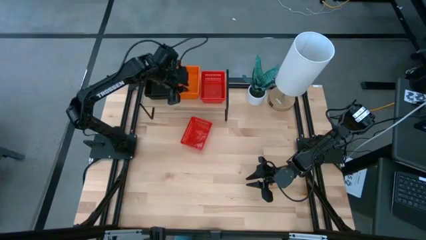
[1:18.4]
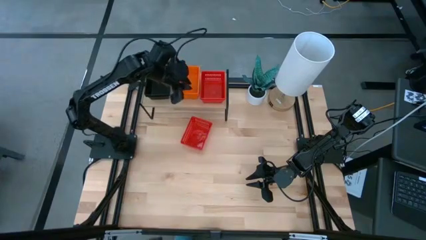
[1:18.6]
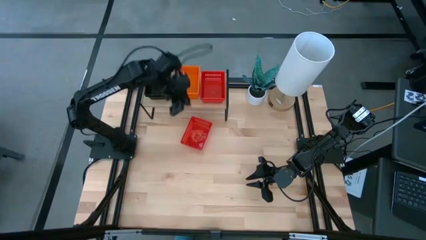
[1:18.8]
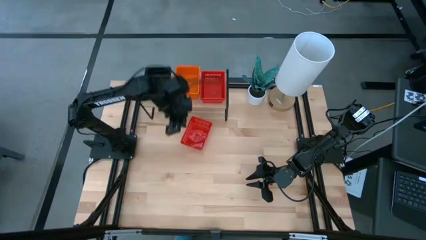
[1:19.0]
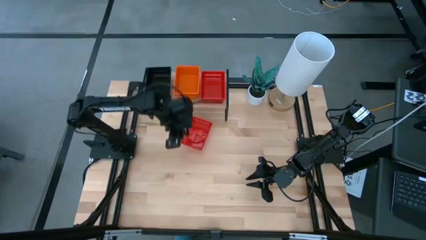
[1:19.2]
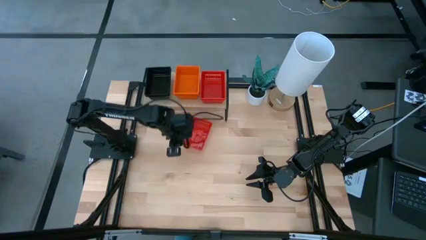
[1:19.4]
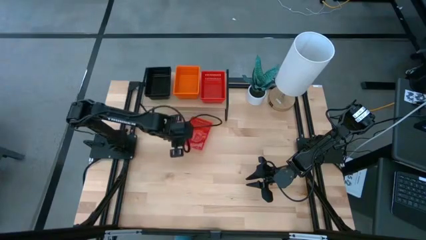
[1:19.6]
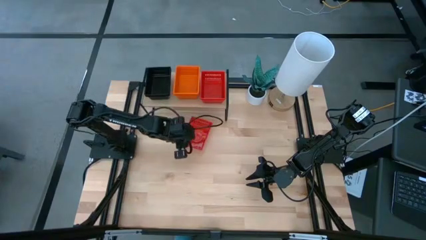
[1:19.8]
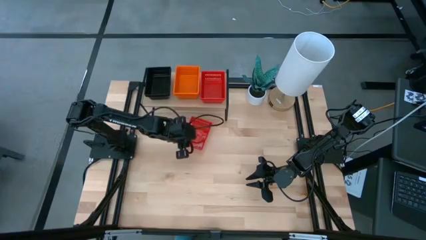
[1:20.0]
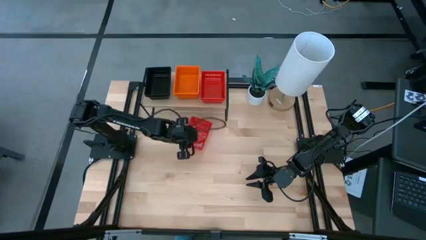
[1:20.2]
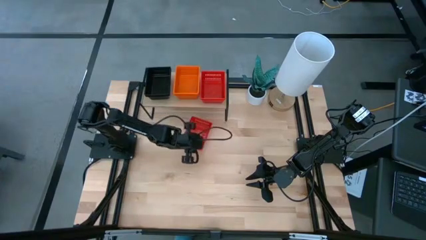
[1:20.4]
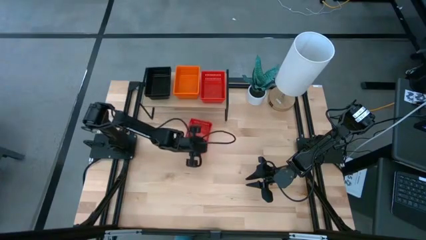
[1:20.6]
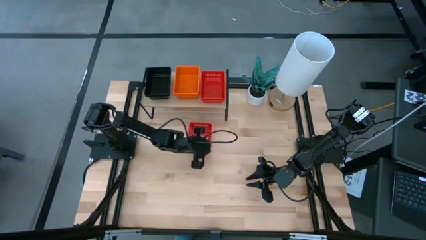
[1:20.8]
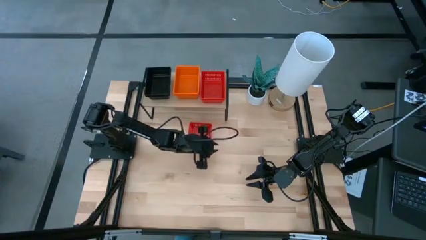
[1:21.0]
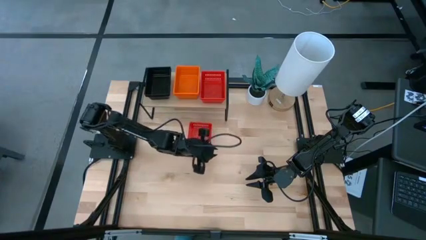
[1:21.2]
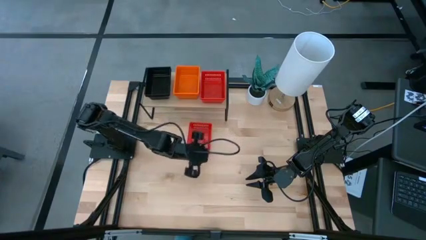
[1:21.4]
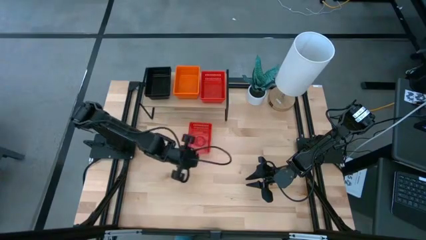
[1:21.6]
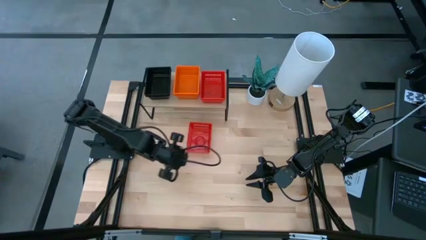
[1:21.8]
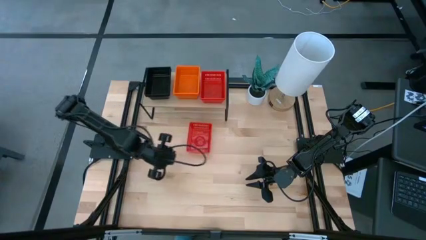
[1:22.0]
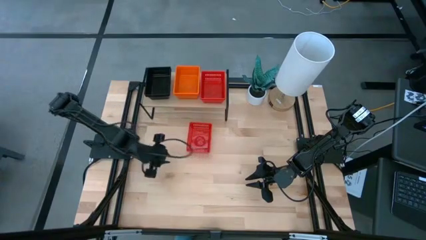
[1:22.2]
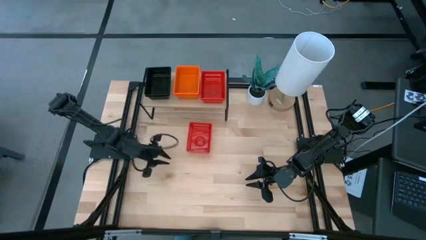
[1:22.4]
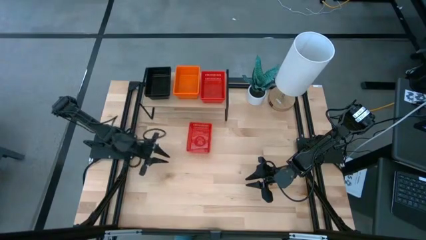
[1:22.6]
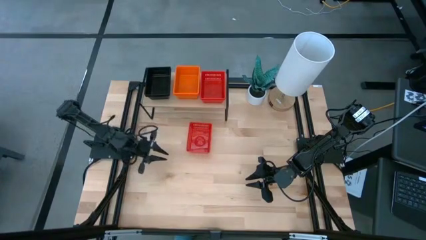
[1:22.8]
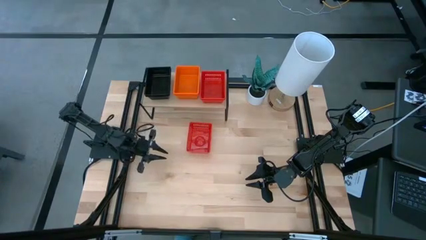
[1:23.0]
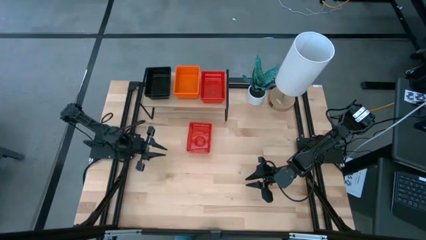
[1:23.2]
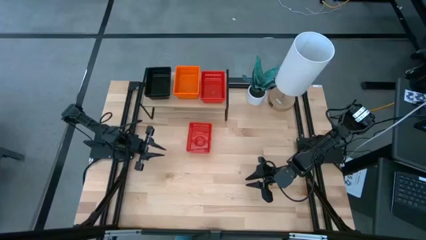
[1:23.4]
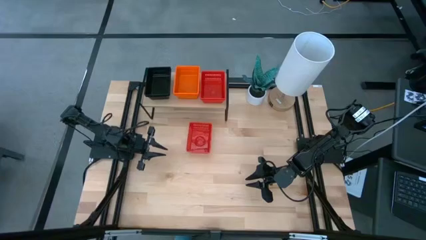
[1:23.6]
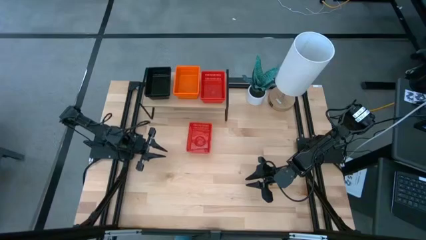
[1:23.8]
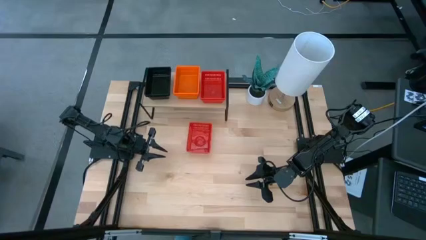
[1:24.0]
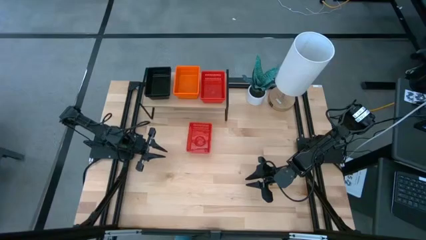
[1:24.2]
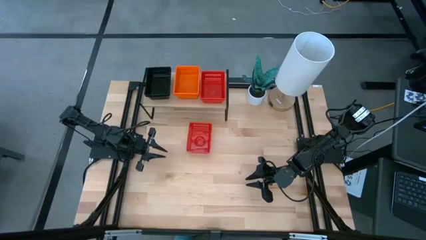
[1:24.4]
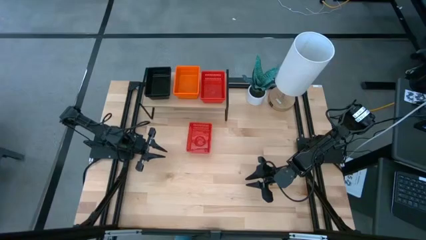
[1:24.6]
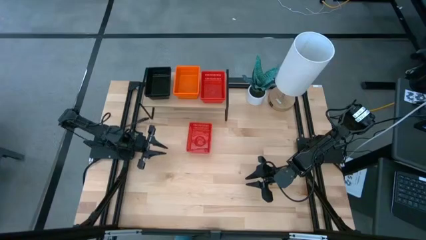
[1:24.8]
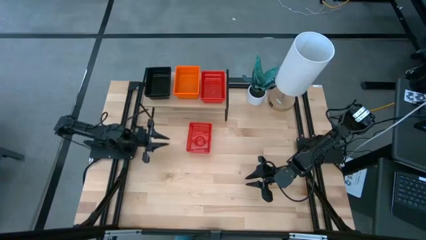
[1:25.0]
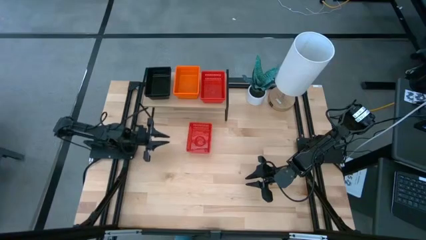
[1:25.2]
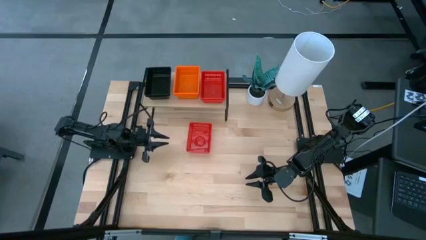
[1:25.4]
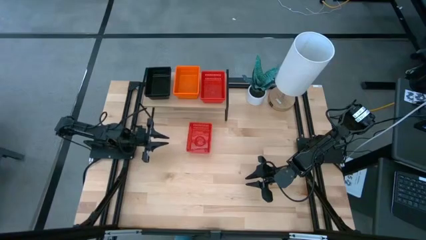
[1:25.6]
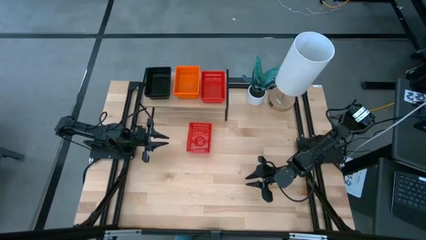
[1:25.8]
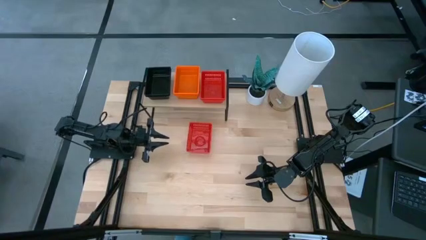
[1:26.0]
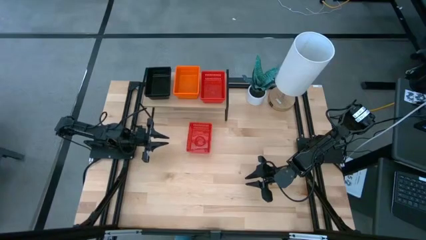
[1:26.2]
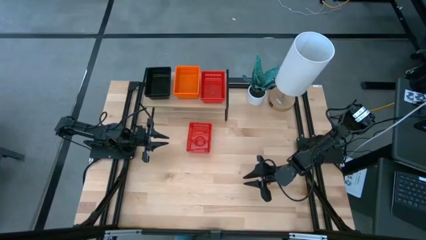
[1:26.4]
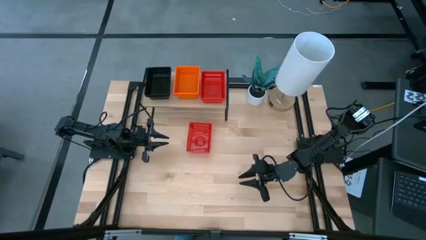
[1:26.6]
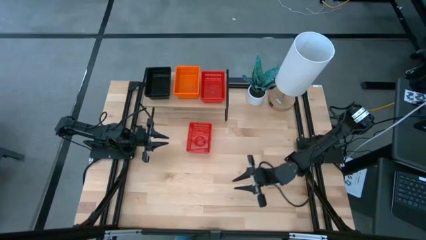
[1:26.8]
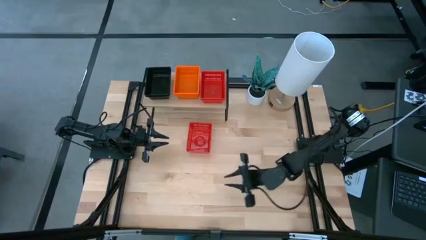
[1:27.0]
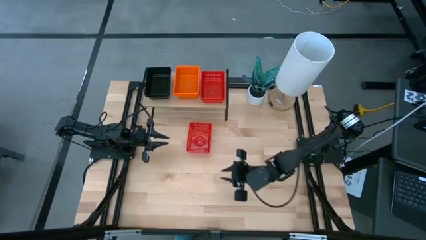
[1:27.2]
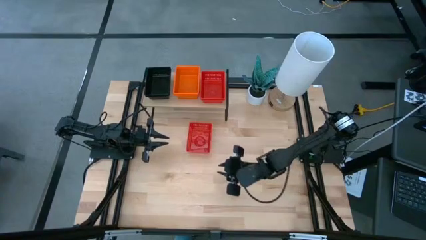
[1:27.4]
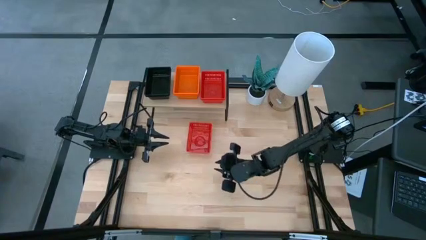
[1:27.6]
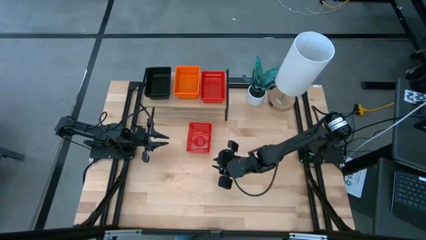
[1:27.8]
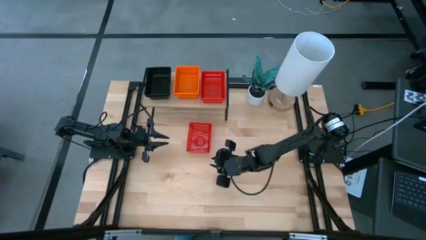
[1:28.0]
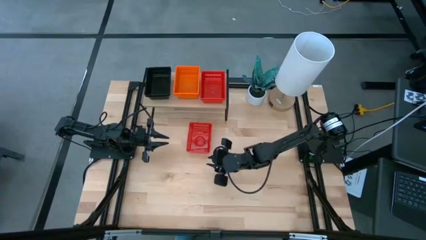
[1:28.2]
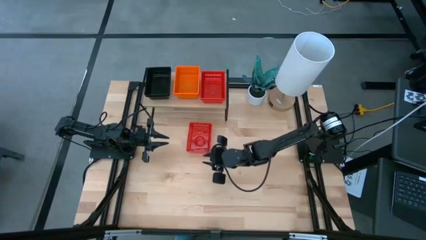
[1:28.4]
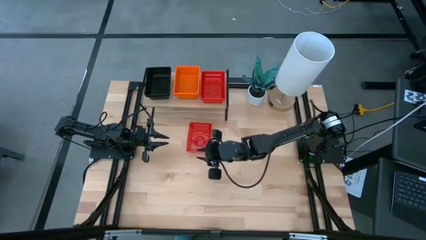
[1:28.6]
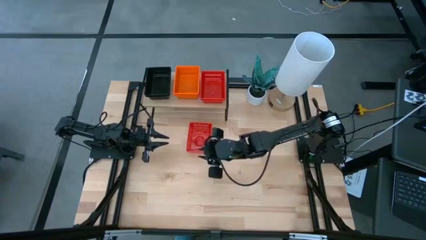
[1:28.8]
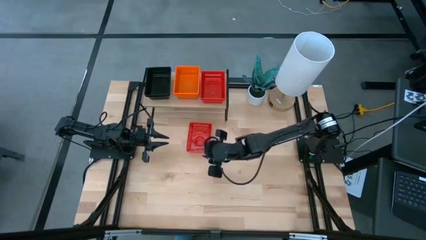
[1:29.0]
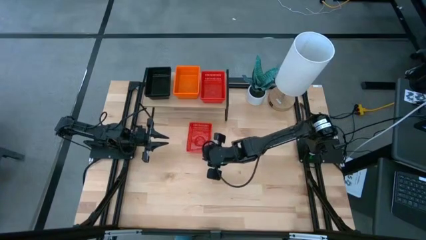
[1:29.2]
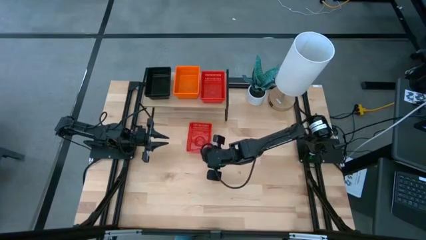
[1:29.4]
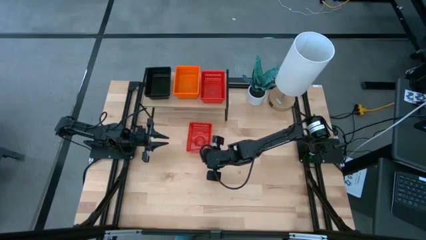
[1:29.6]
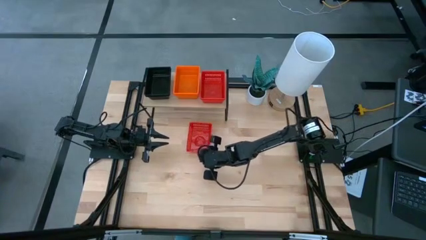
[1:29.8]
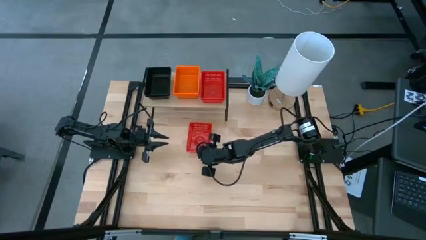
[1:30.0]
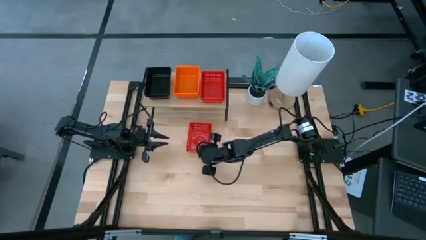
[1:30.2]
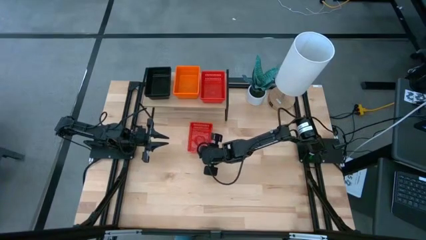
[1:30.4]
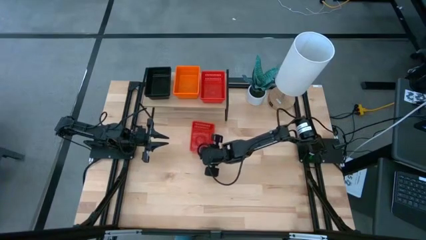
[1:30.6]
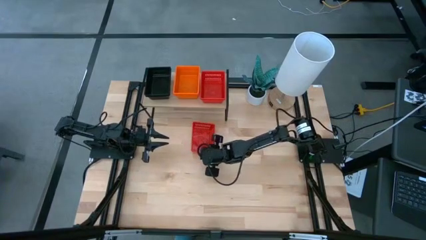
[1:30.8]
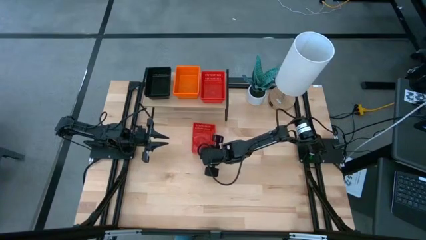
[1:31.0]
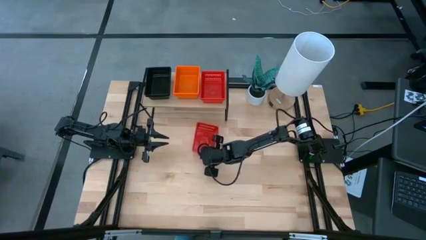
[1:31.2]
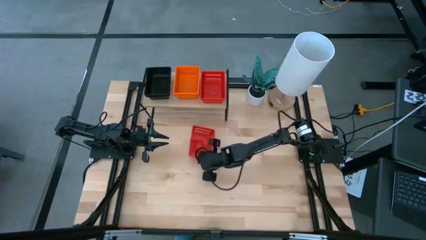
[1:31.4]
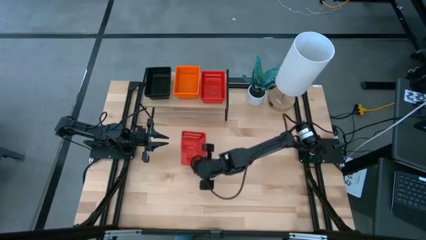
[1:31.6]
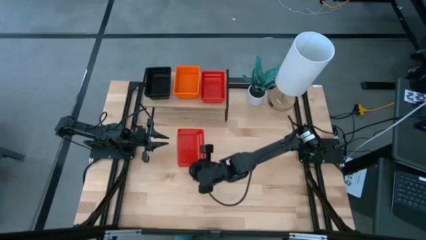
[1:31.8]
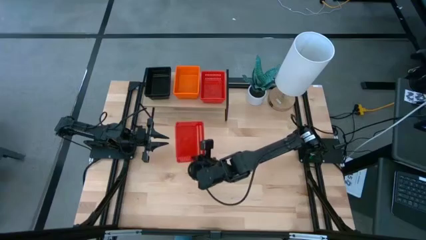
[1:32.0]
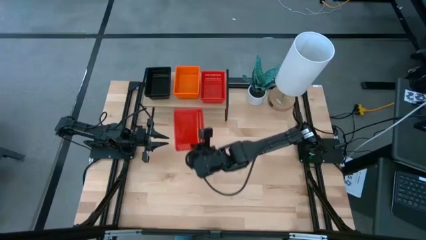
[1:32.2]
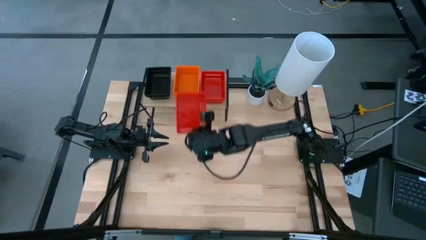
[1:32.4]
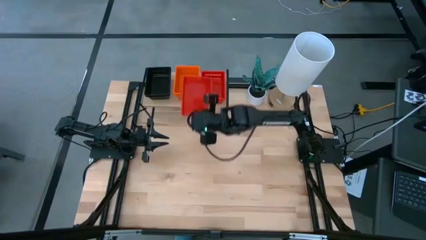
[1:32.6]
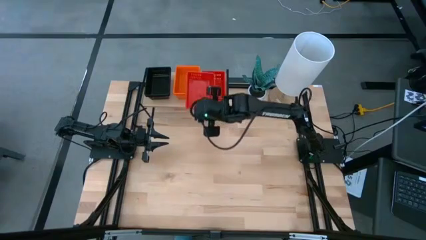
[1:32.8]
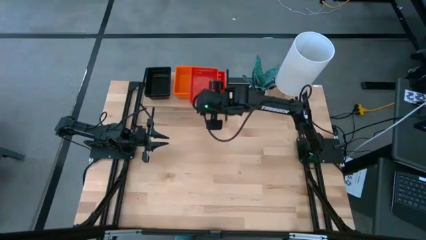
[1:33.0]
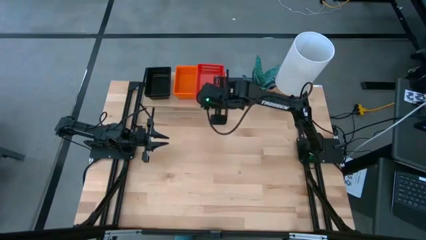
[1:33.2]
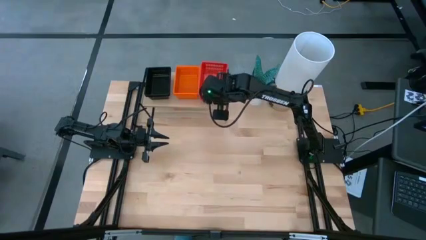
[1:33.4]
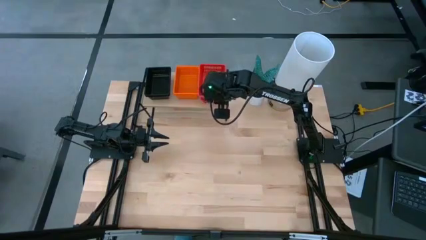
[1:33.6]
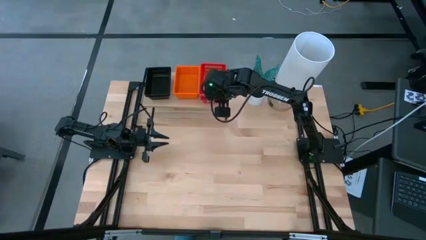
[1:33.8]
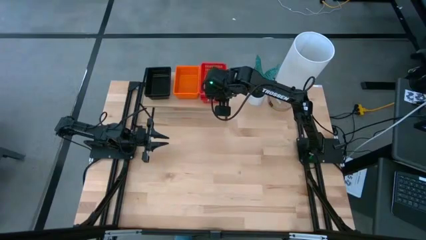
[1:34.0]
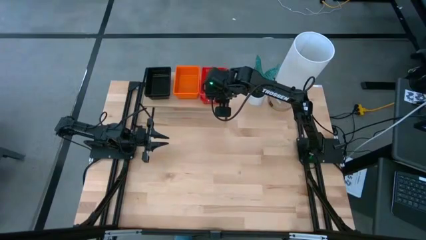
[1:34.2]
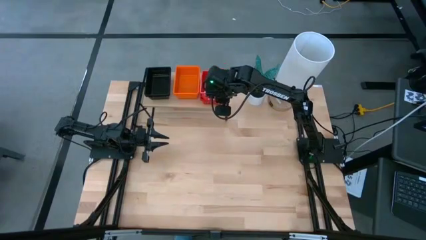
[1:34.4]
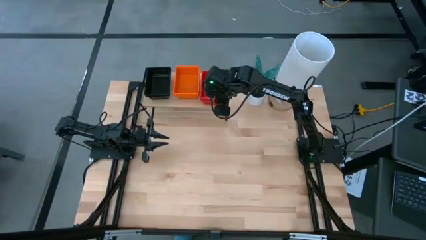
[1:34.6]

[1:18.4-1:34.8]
Task: Stack baskets on shelf by color
Stack the red bin on top of the red bin on the shelf
